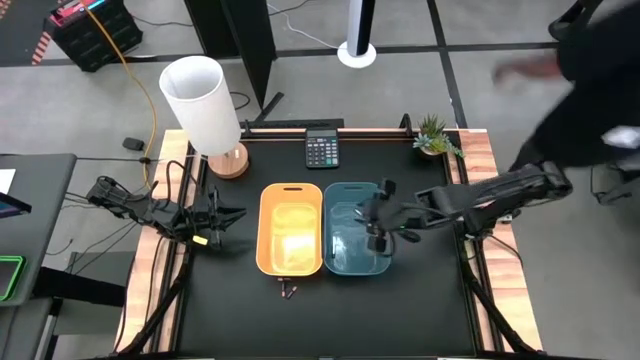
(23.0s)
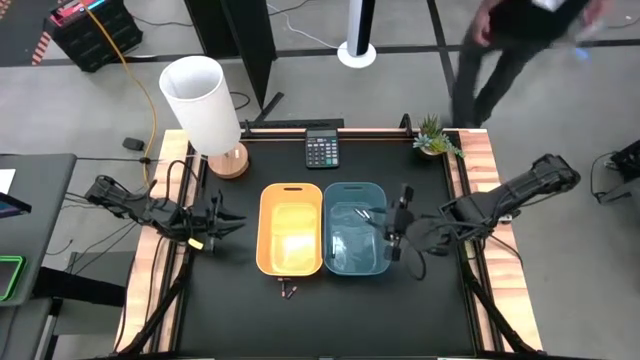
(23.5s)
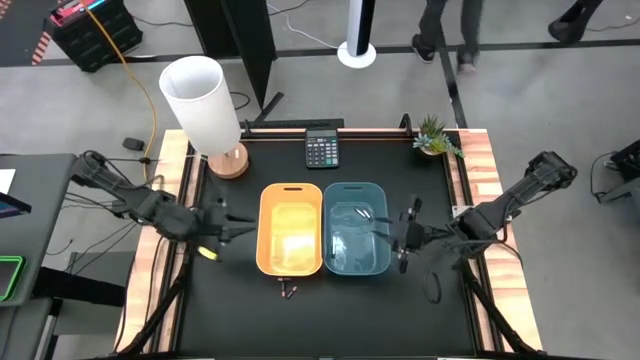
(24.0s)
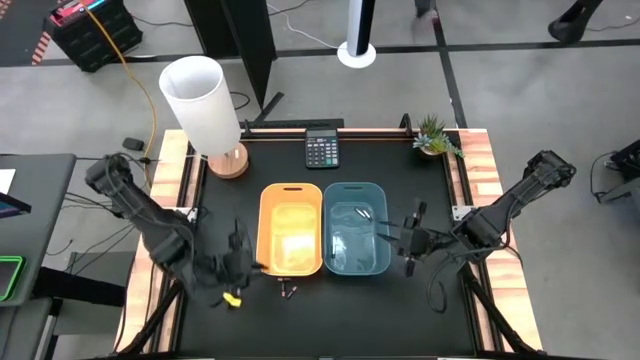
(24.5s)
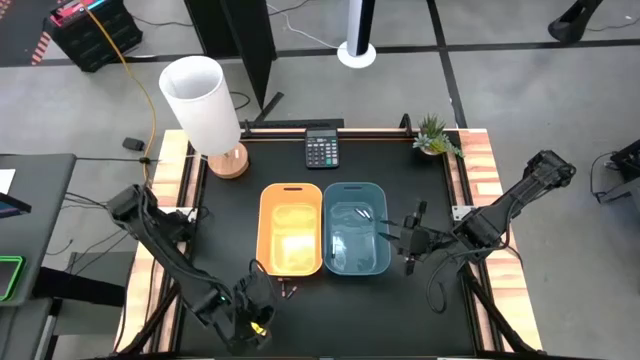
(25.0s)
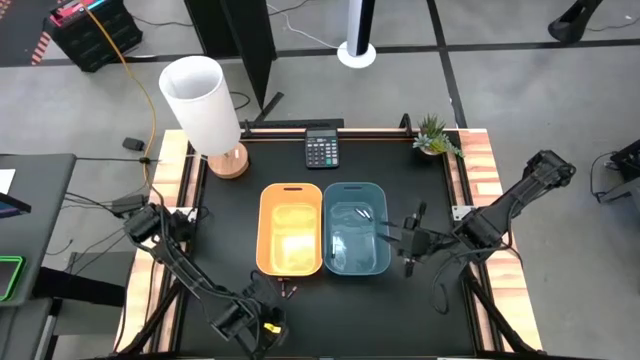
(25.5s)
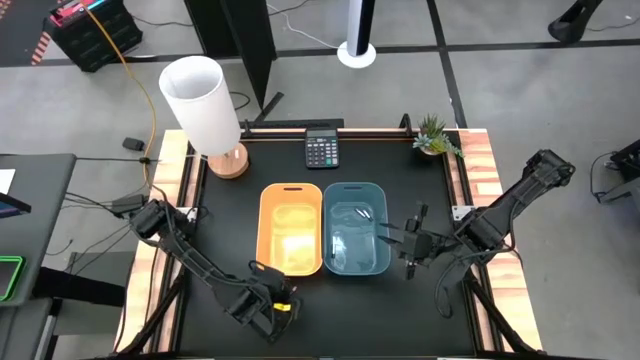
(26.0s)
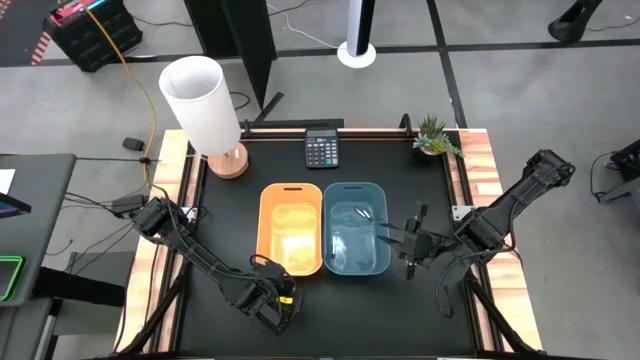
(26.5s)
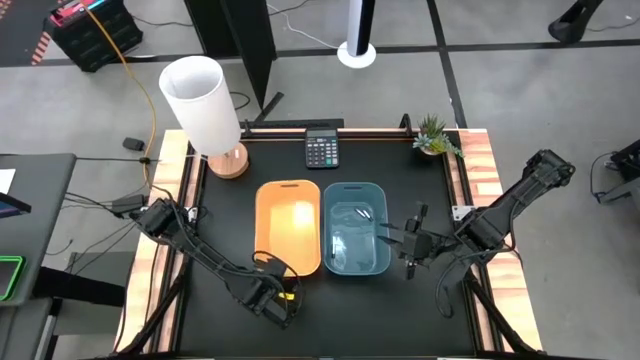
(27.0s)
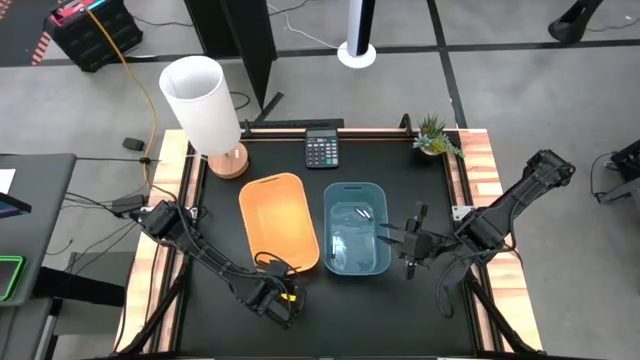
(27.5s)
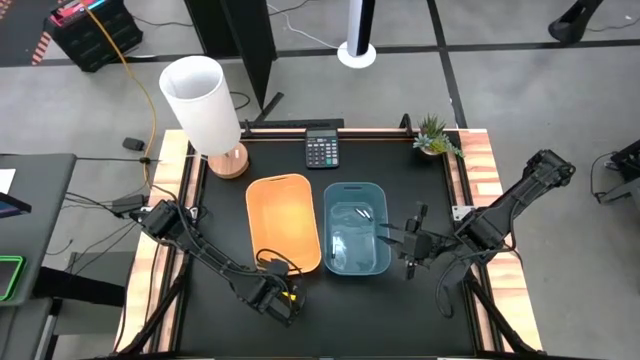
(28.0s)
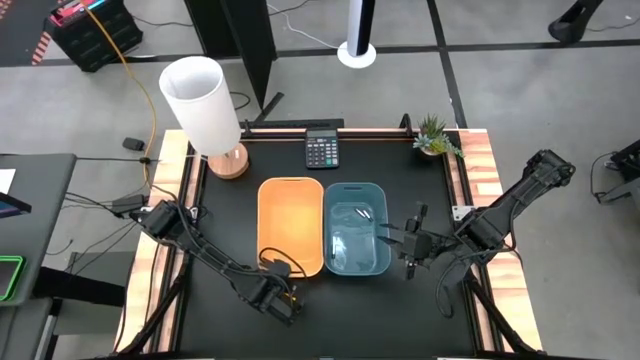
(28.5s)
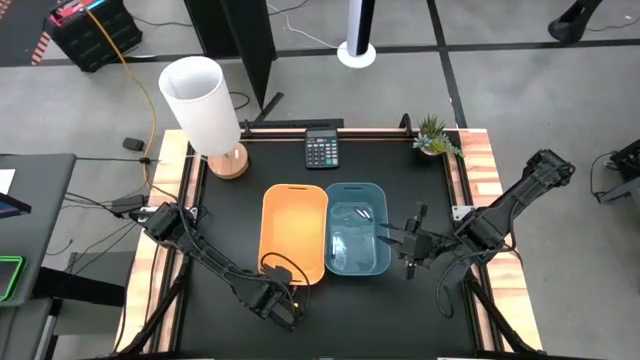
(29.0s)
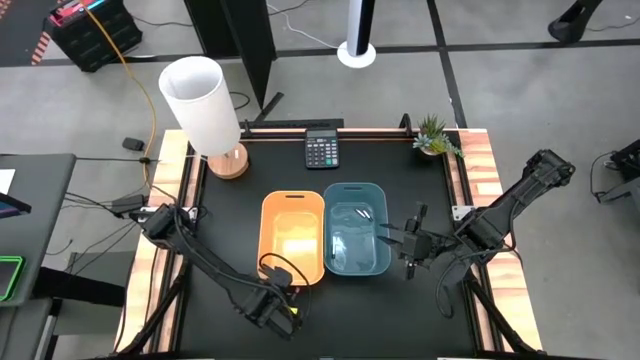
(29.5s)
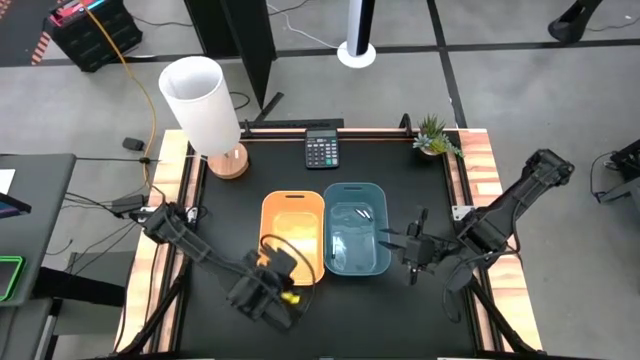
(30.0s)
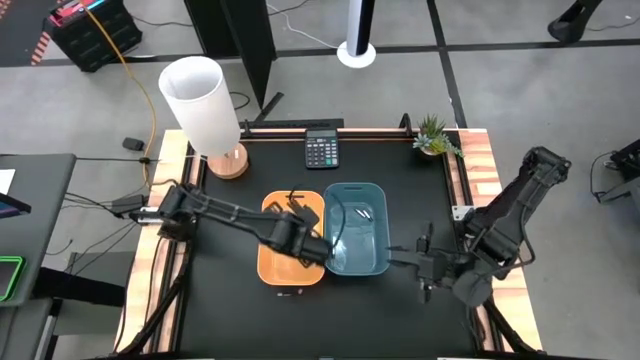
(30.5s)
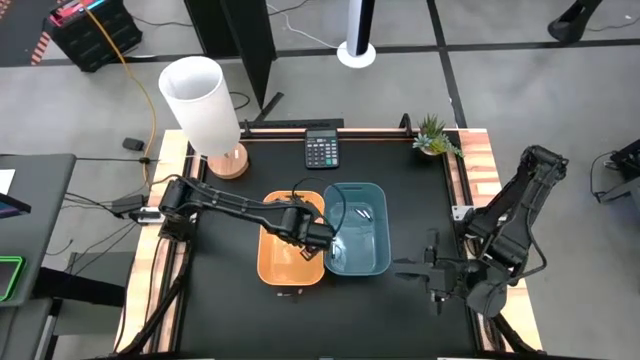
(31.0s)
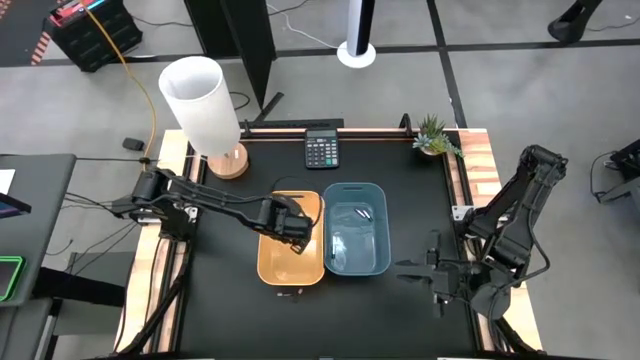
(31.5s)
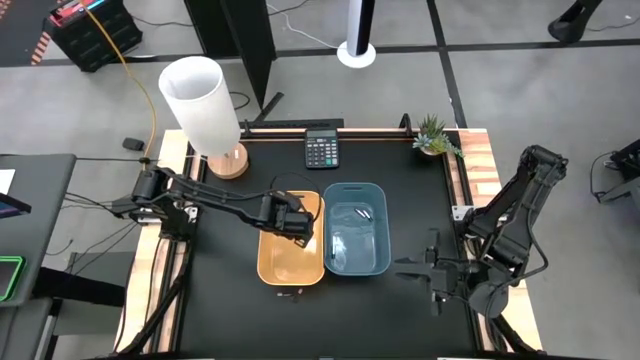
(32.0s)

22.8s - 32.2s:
Task: Sort batteries
Put the bottom left black battery into the yellow bin

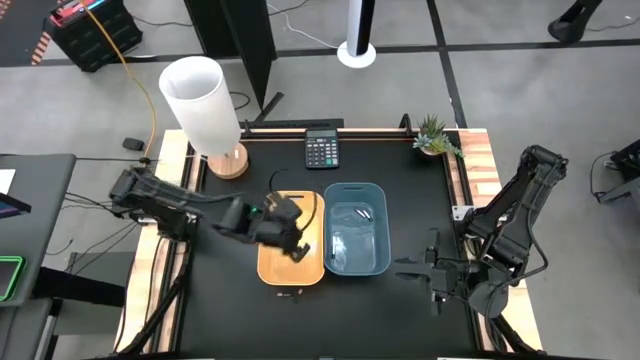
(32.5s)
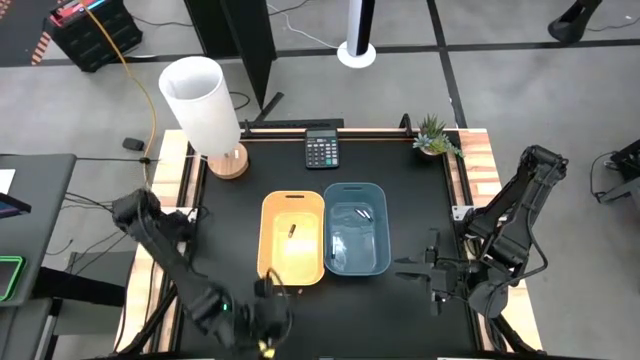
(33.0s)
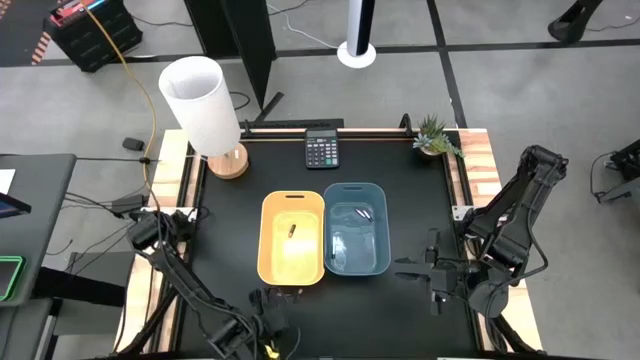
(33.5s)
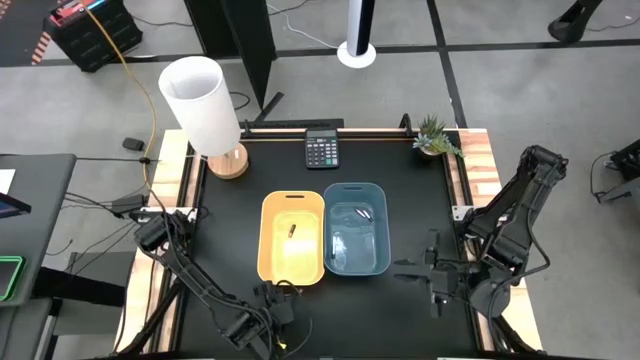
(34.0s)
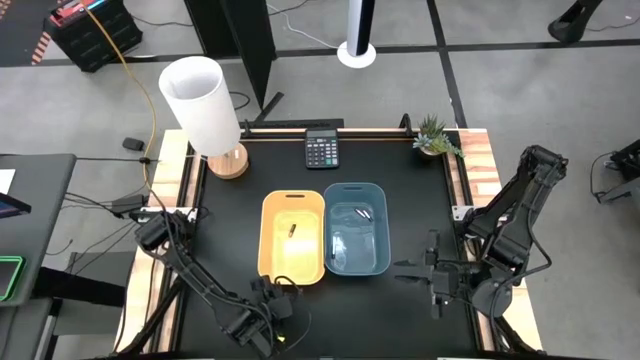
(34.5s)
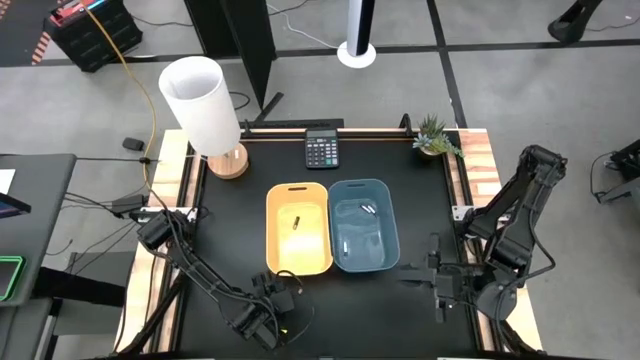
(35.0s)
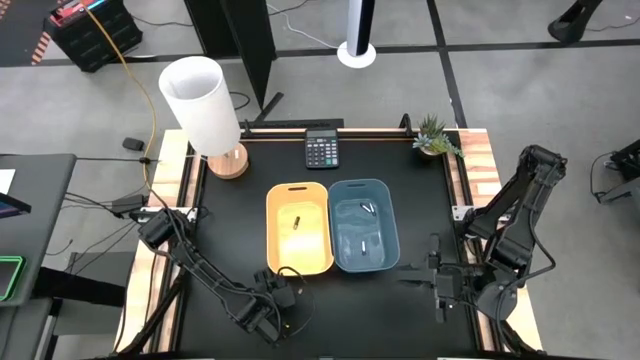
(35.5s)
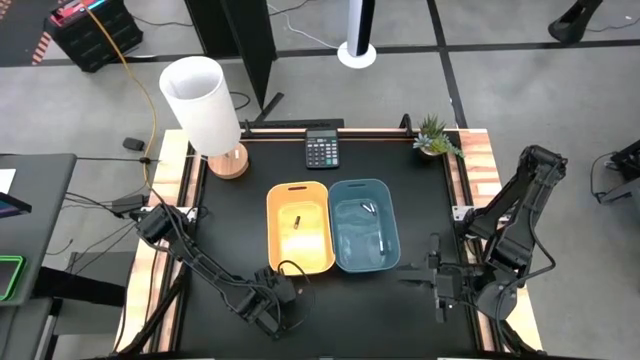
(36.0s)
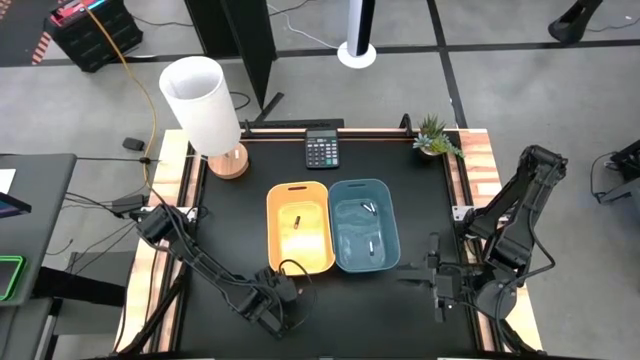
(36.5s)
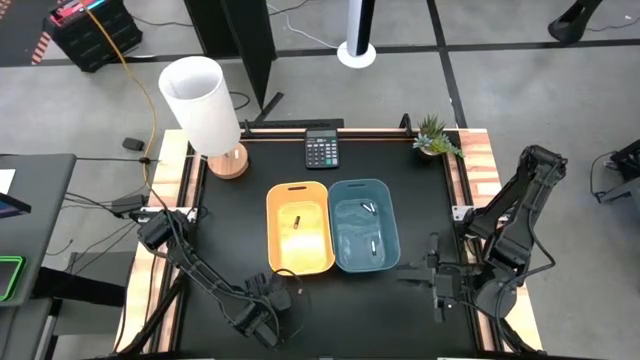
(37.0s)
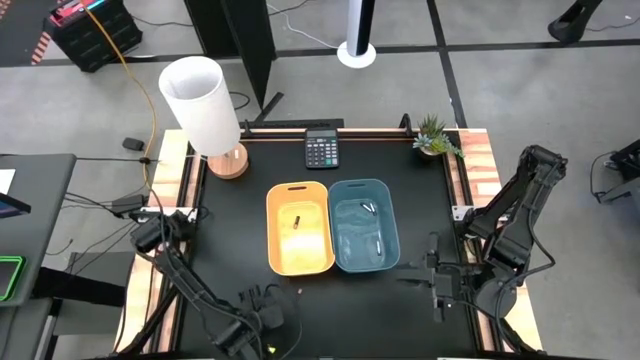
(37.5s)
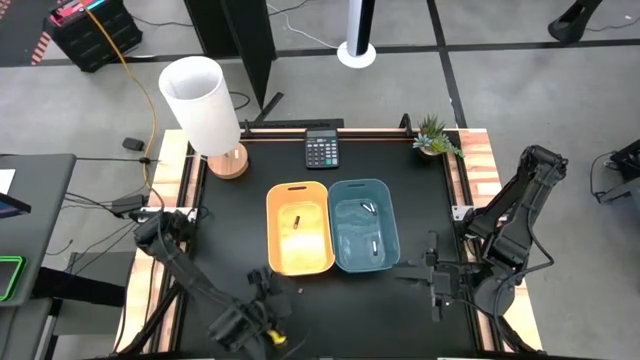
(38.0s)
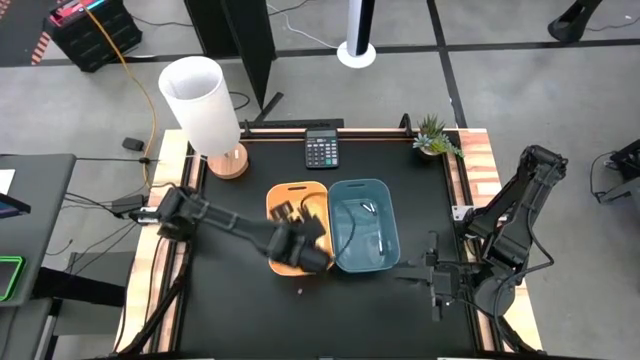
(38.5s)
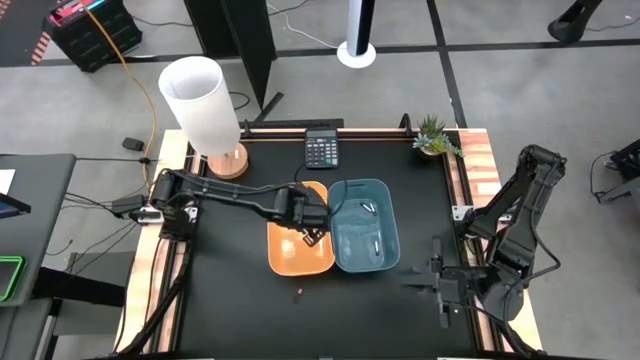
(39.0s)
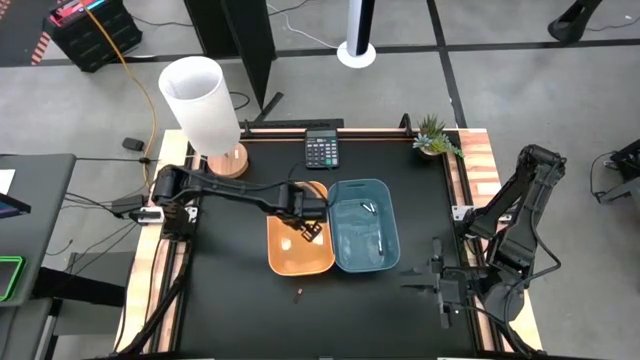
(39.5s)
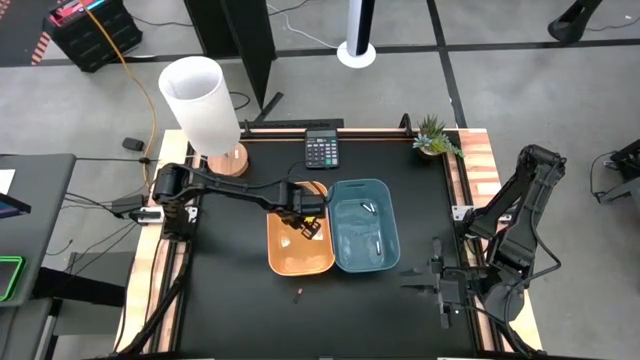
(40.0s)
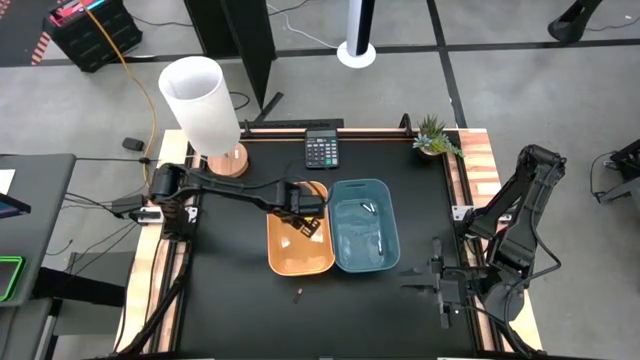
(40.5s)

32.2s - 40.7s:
Put the left black battery into the yellow bin

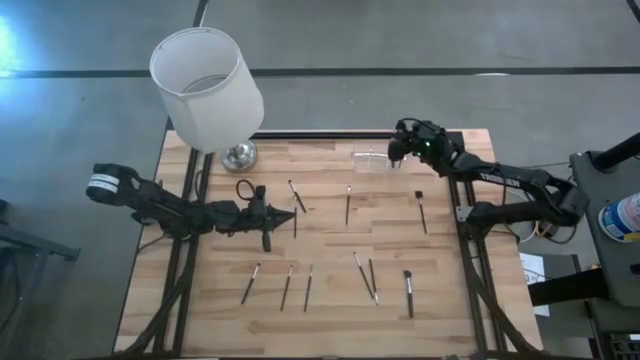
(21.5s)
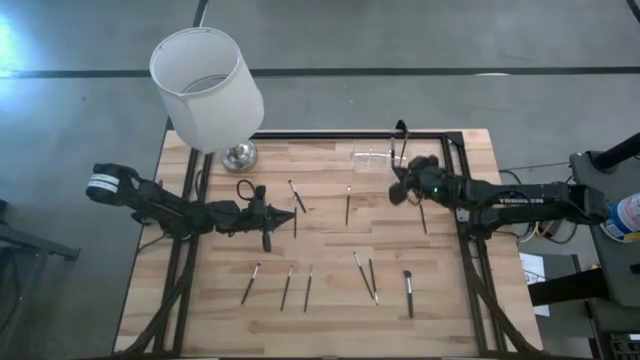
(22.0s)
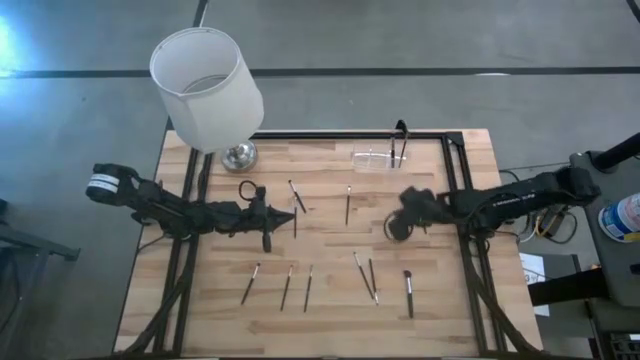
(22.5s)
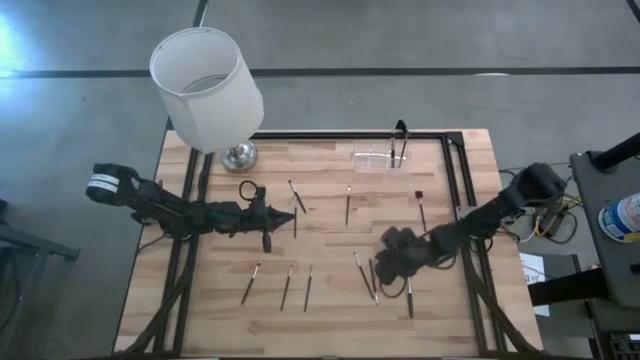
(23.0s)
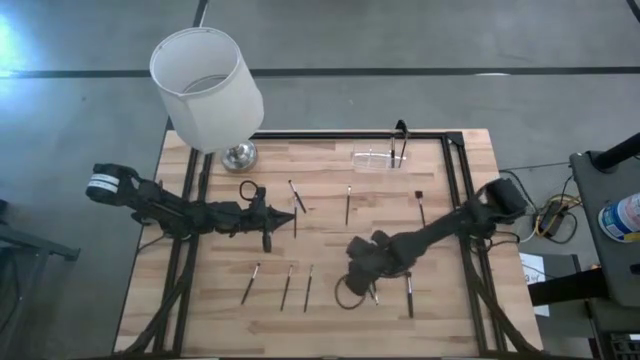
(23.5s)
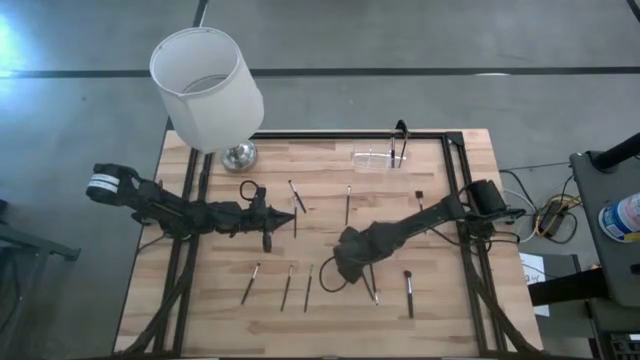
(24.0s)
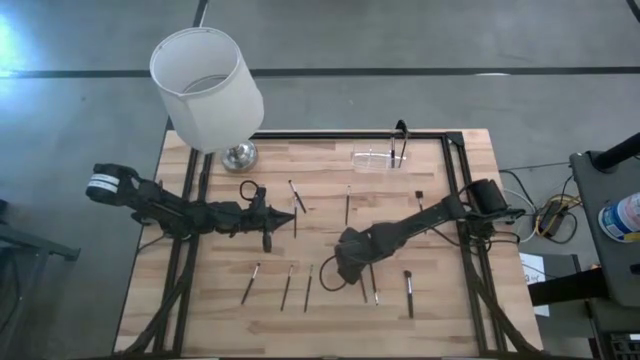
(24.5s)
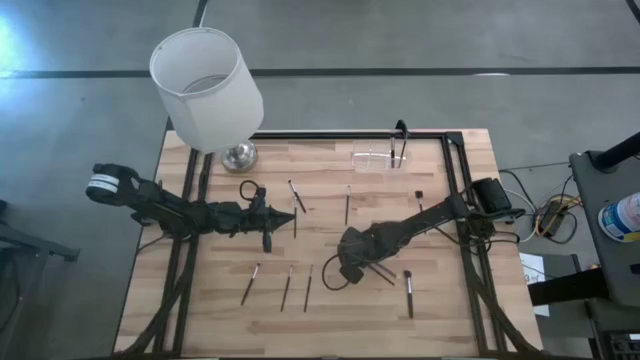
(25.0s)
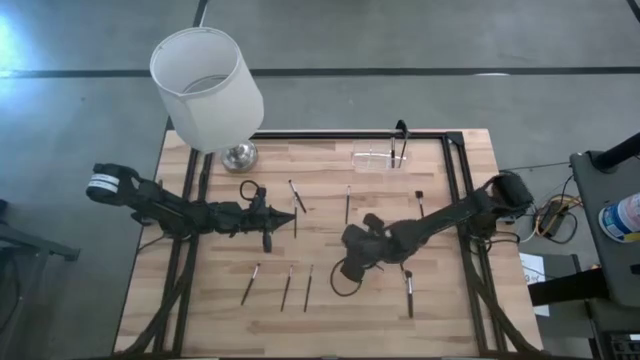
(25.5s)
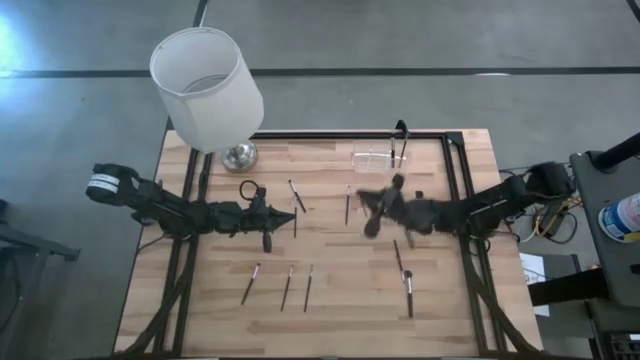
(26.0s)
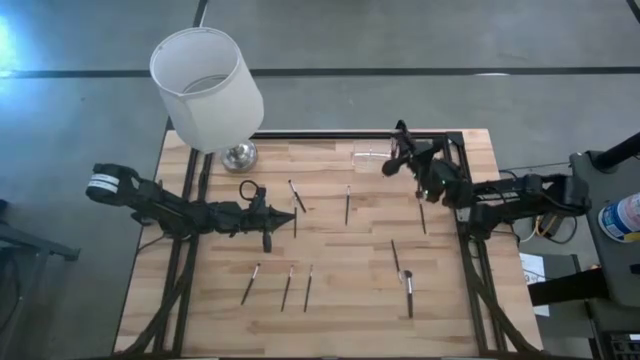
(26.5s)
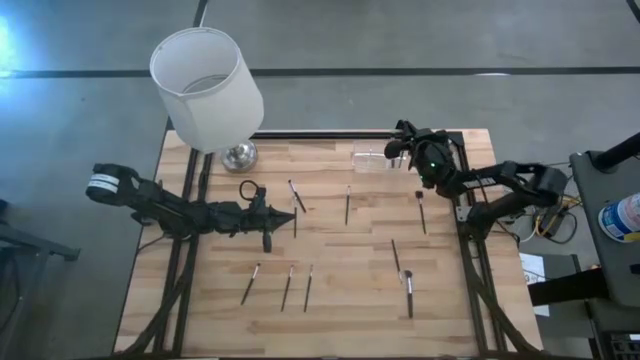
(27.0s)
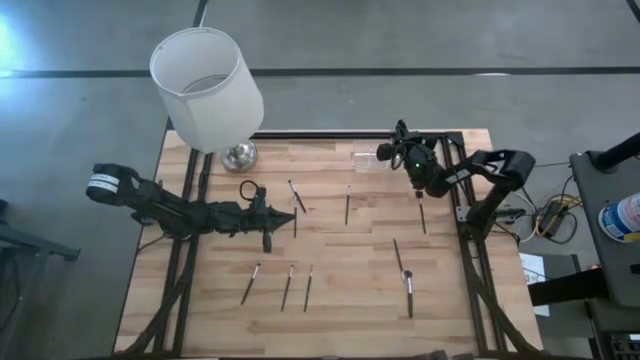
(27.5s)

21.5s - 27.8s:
Task: Put items in baskets/containers
Put the eyeshadow brush into the transparent organizer
